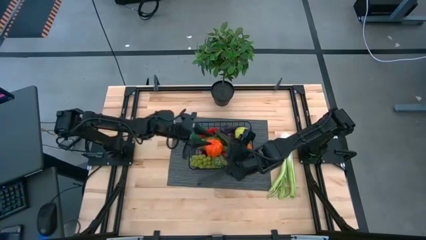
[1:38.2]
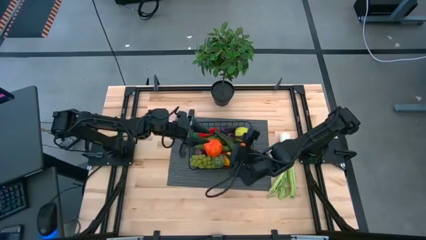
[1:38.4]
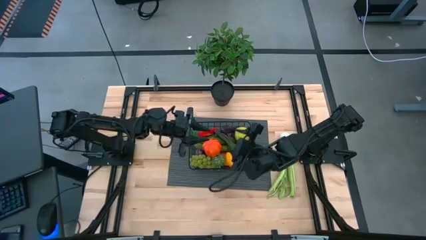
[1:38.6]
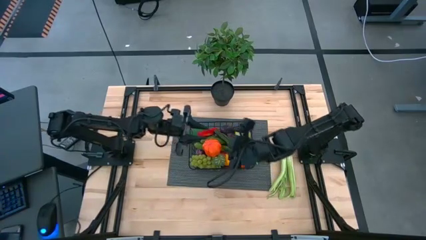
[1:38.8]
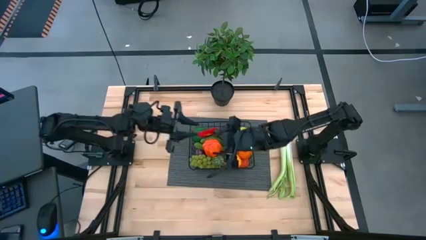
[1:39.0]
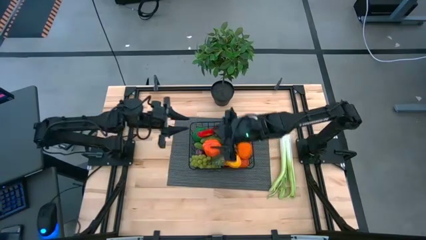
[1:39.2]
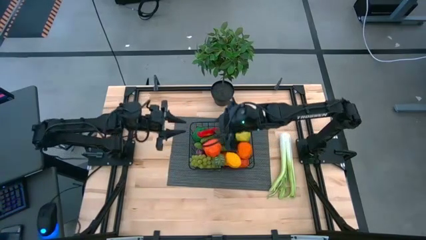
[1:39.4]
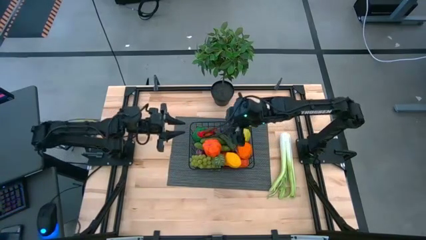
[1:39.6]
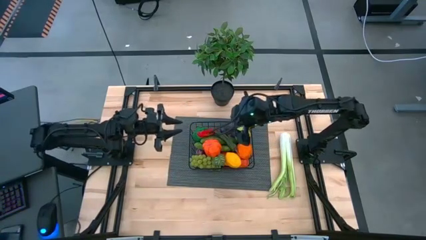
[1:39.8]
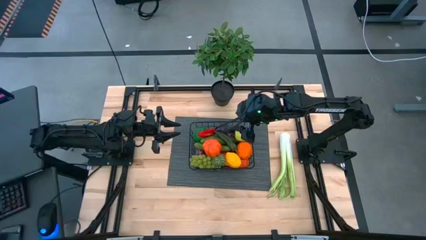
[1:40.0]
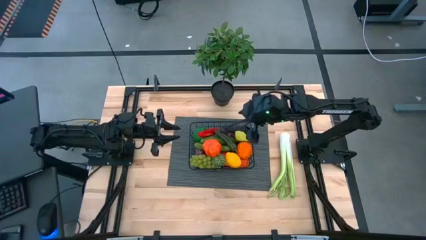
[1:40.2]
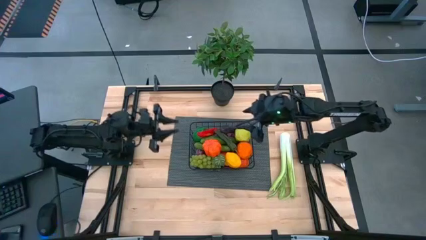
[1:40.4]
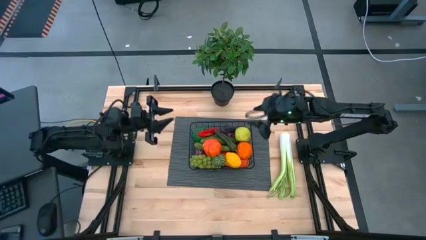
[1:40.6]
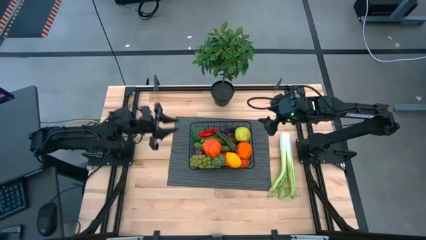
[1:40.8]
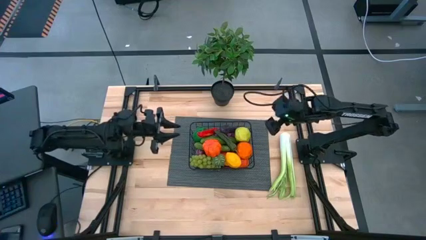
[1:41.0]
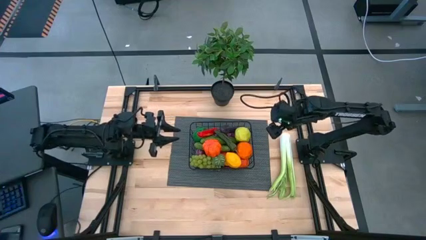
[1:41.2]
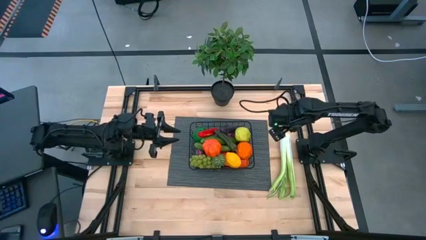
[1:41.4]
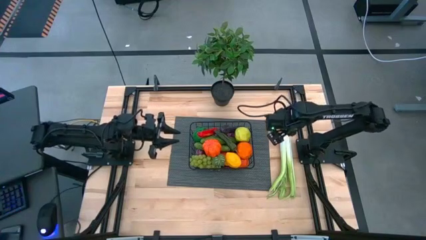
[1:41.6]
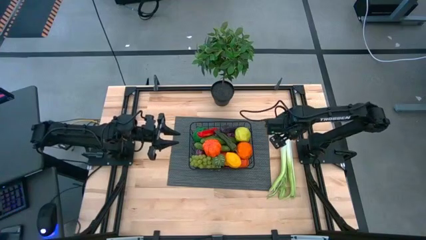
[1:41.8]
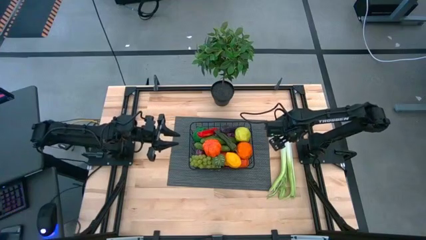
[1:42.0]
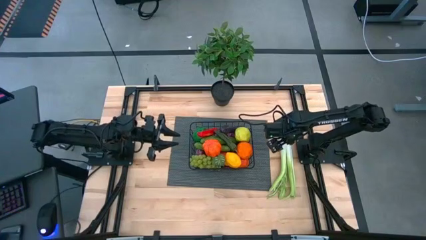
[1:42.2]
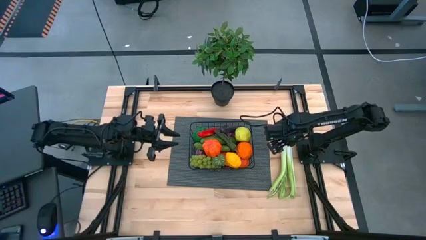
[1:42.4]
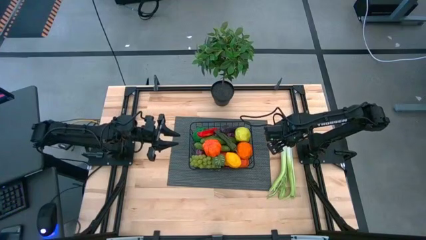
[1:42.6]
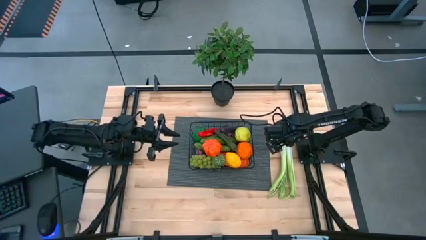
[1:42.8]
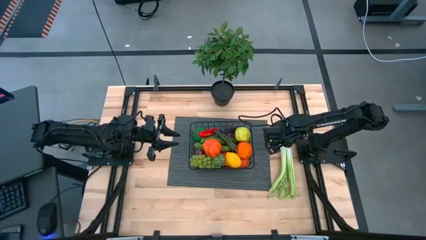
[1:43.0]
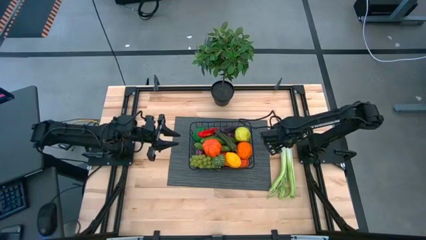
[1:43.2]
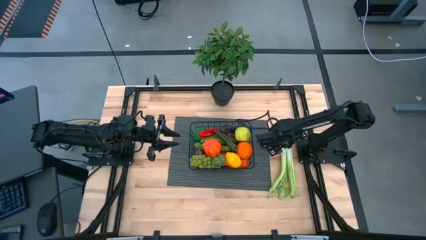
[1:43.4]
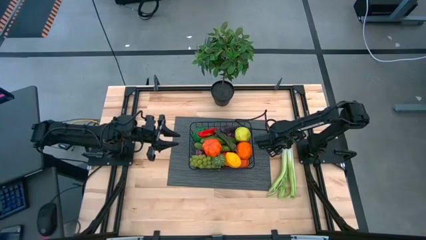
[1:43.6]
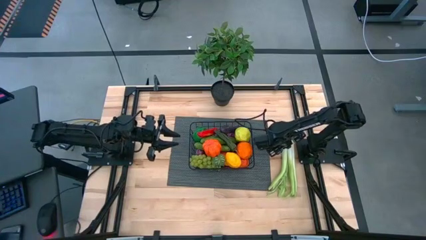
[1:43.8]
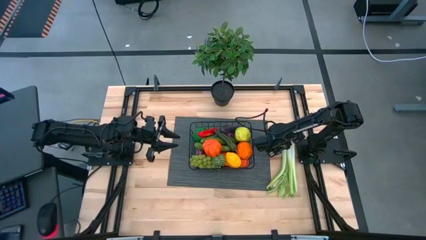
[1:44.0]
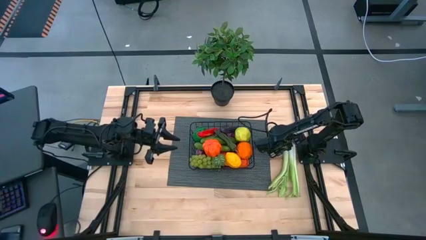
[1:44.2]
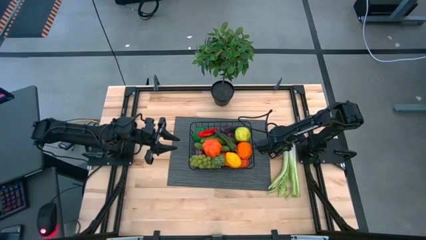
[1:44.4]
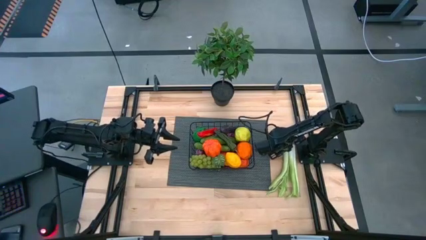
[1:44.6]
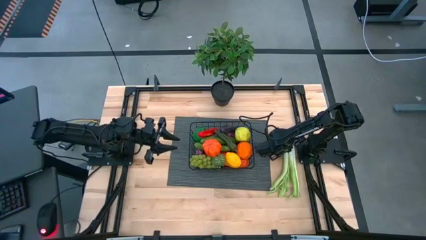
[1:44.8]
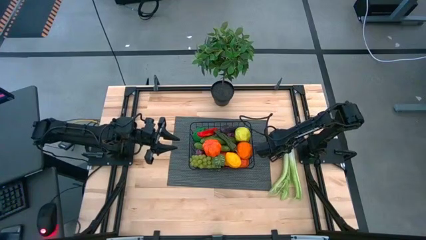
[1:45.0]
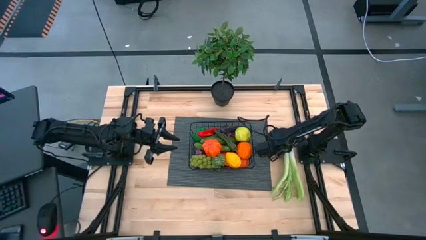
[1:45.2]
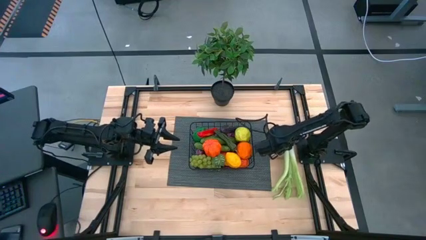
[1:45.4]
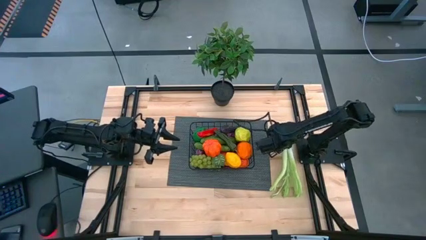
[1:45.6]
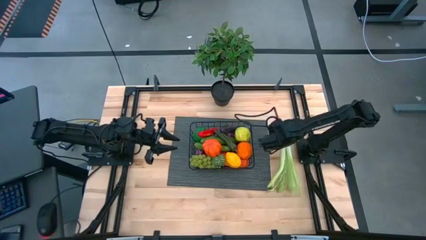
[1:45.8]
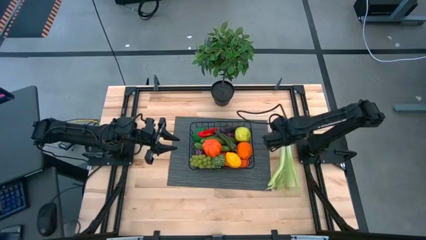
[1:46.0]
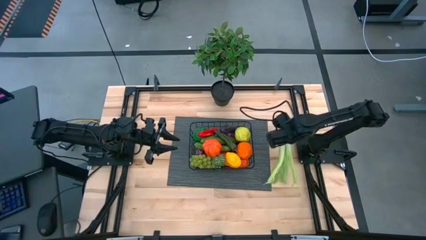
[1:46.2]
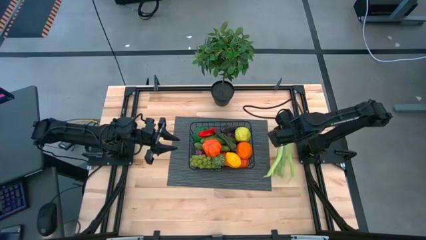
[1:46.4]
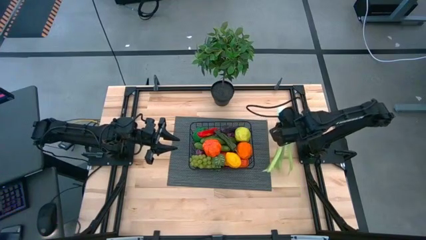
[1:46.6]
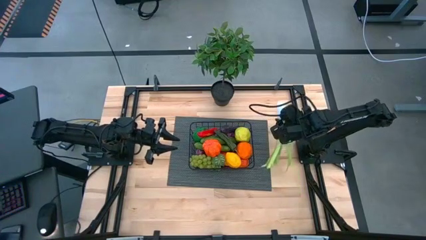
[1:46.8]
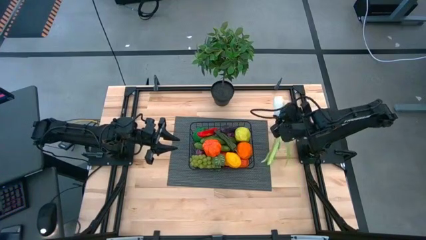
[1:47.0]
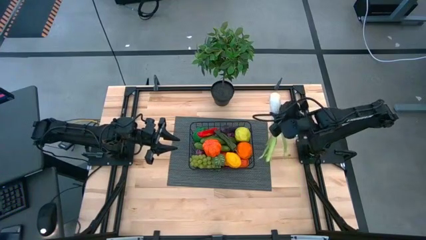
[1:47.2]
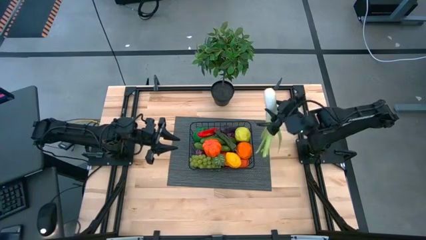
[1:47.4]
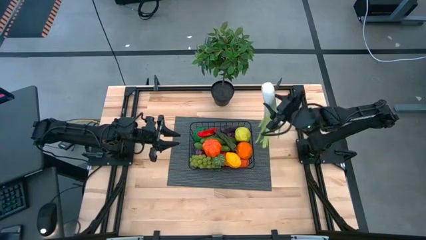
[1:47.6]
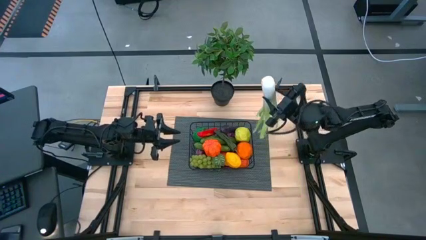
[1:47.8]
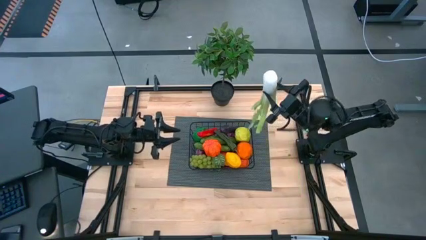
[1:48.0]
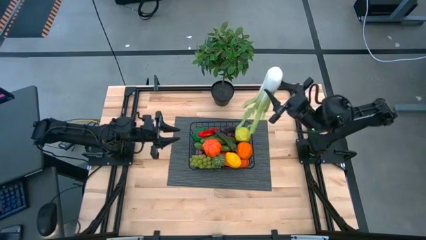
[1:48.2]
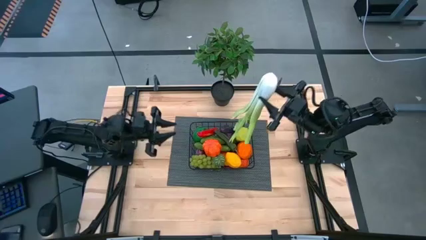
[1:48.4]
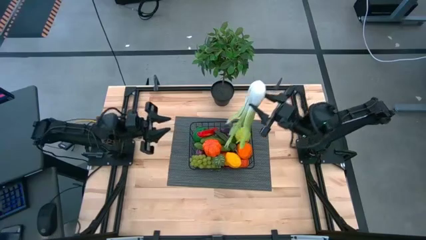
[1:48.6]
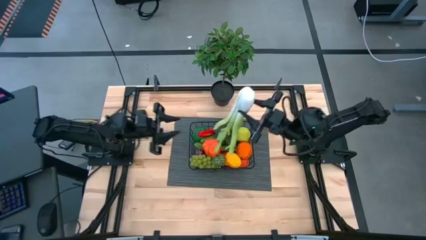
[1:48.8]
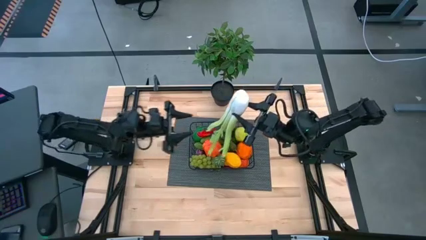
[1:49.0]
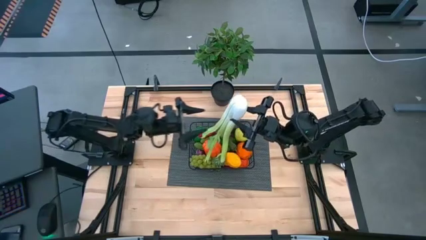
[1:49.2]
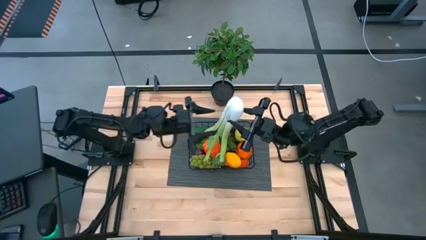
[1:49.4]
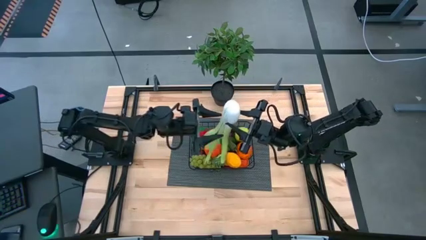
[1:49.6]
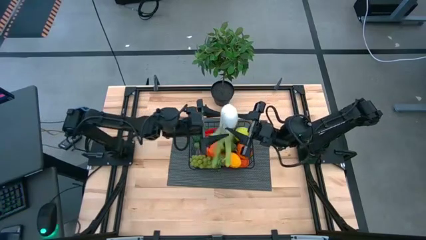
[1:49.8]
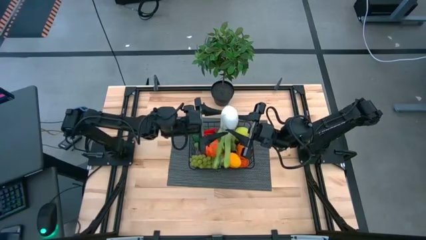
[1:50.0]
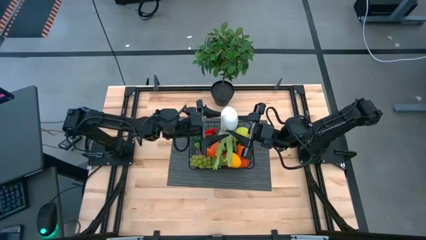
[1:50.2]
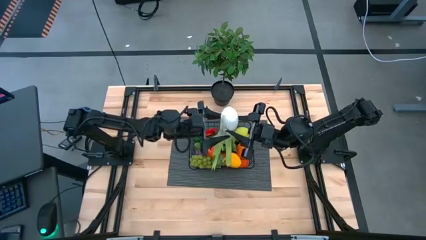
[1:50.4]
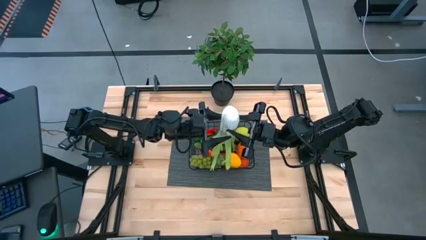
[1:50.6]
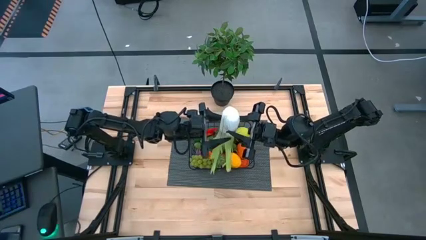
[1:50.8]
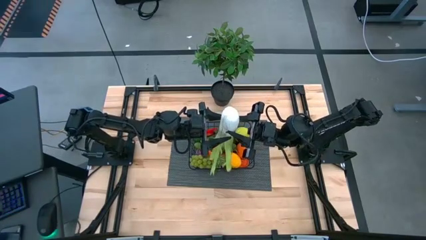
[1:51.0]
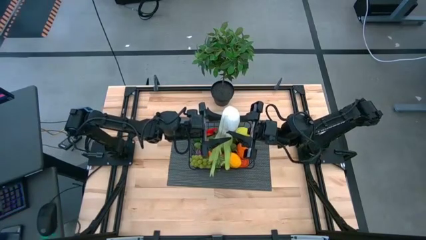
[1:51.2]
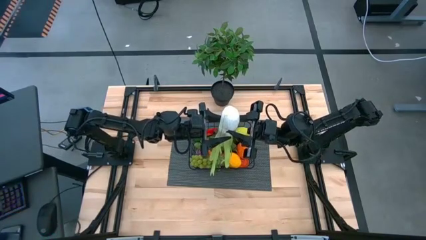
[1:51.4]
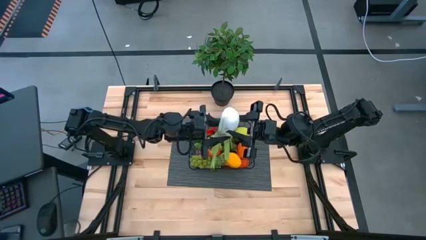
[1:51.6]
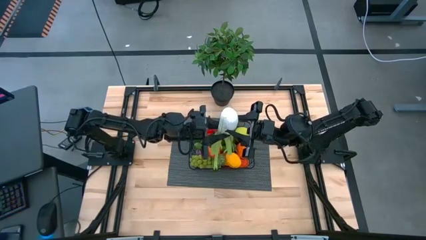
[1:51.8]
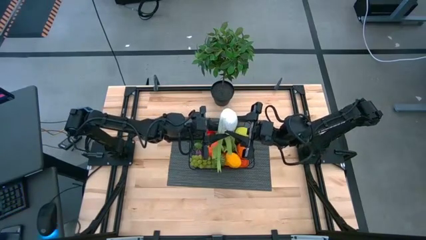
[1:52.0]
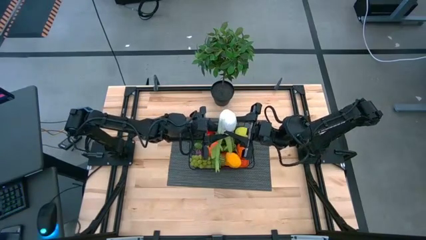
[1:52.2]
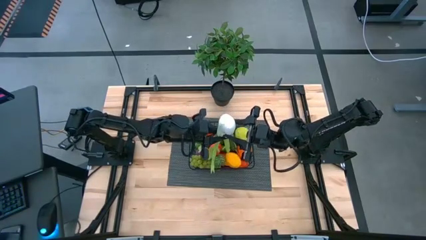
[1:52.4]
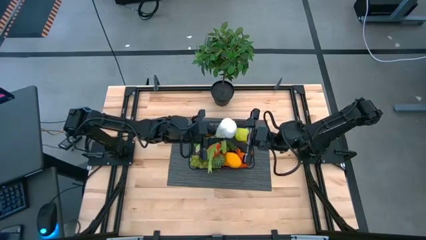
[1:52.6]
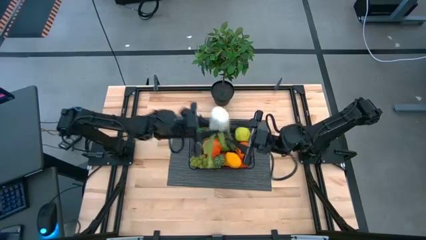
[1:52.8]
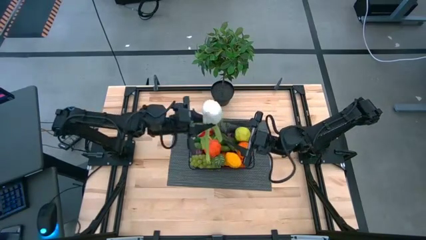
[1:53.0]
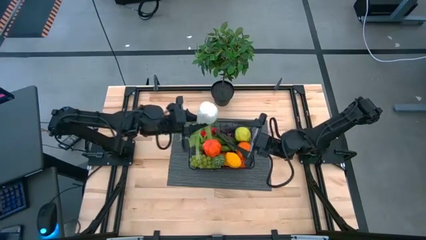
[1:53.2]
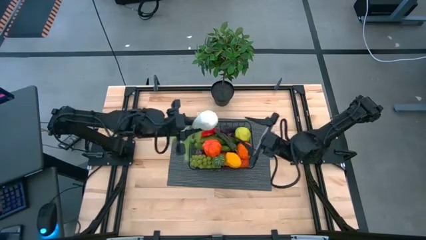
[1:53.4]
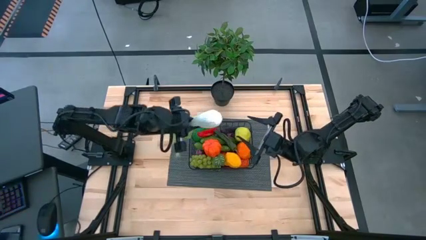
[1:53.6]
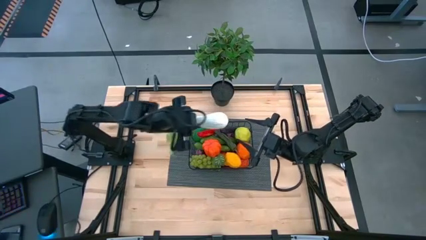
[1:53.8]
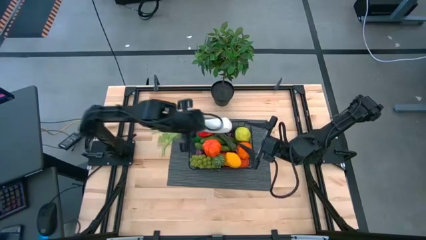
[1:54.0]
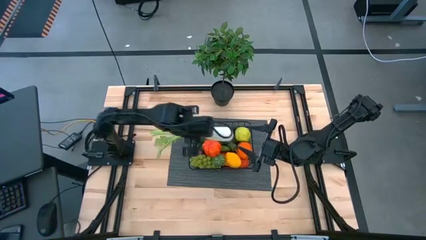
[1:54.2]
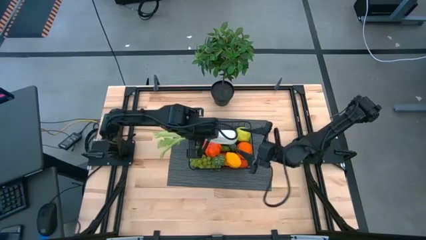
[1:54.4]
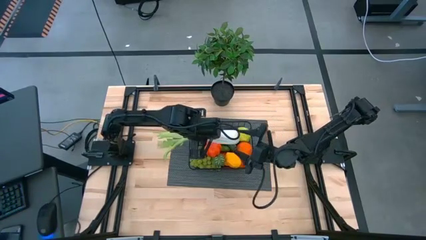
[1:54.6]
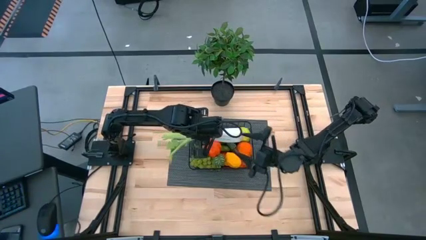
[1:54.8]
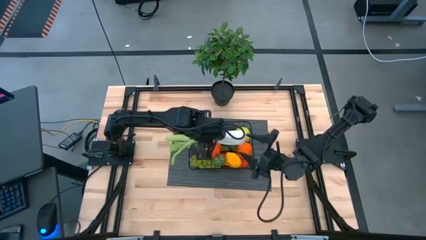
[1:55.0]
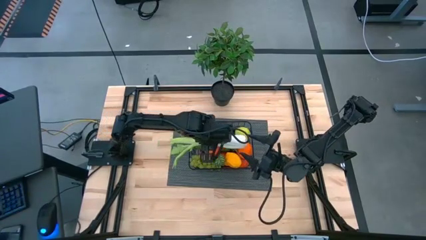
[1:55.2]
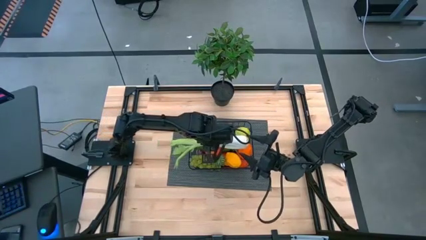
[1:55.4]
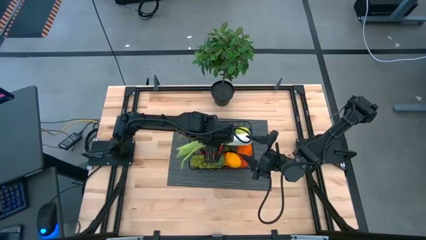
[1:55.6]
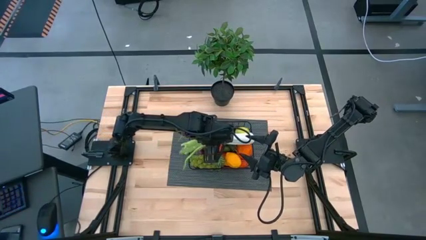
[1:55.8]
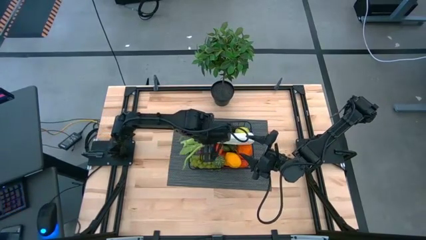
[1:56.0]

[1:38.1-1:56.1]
Task: Build produce basket
Put the celery into the wire basket
